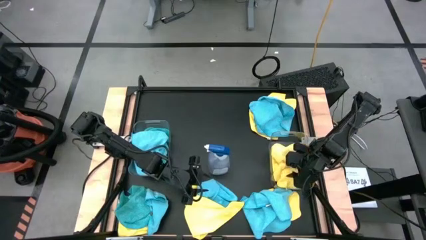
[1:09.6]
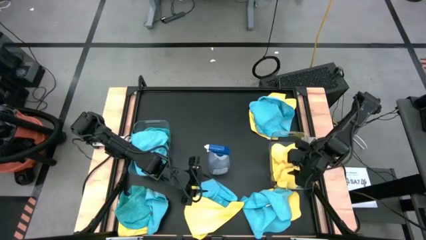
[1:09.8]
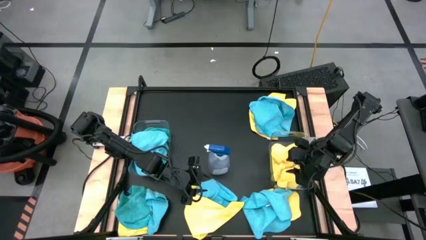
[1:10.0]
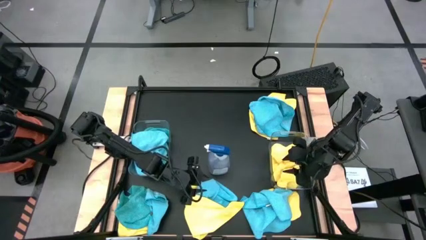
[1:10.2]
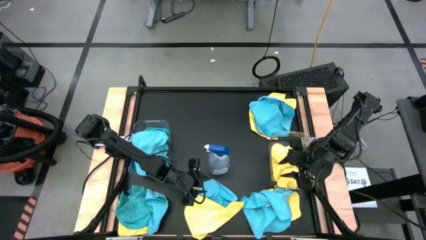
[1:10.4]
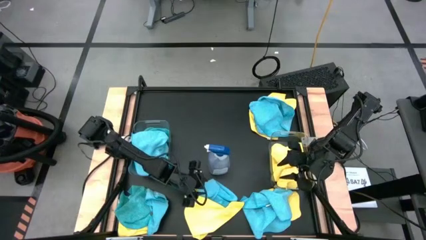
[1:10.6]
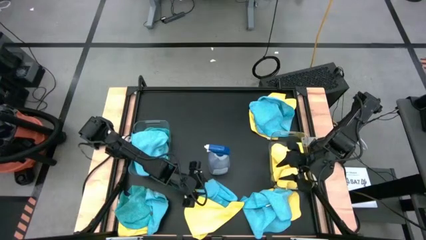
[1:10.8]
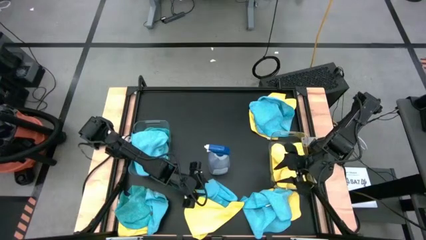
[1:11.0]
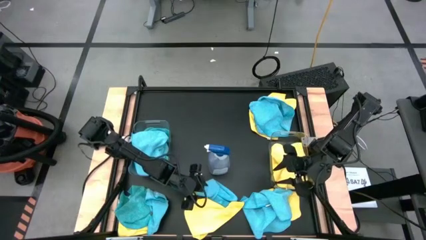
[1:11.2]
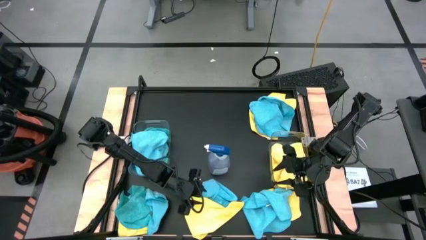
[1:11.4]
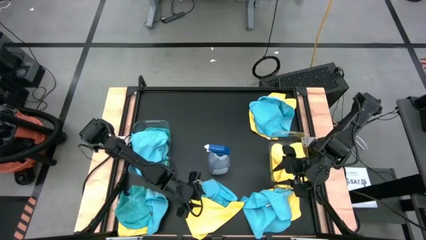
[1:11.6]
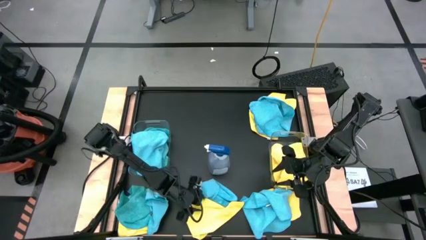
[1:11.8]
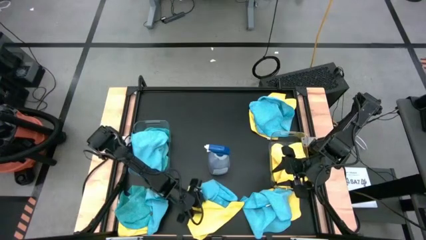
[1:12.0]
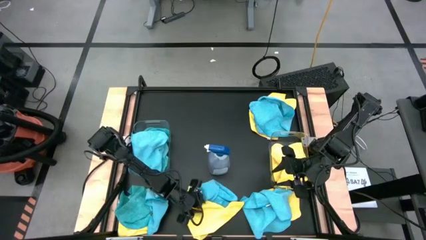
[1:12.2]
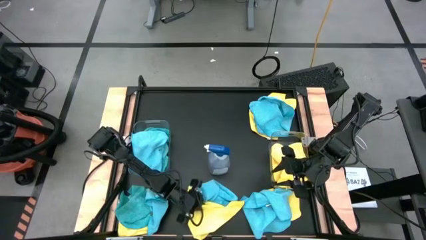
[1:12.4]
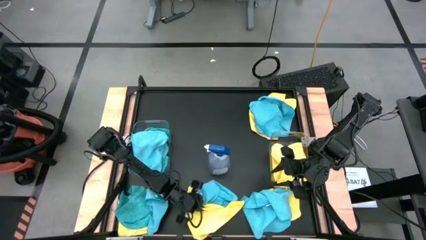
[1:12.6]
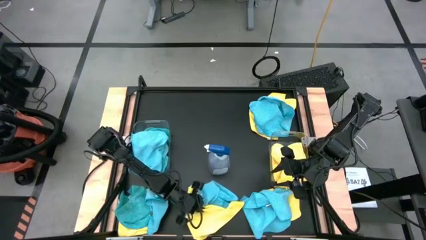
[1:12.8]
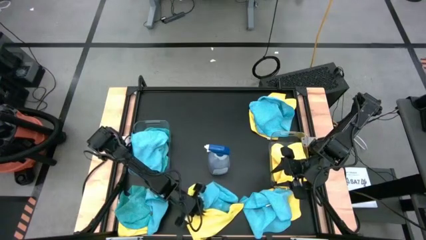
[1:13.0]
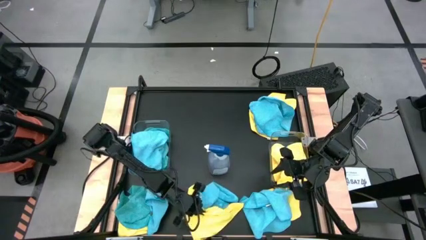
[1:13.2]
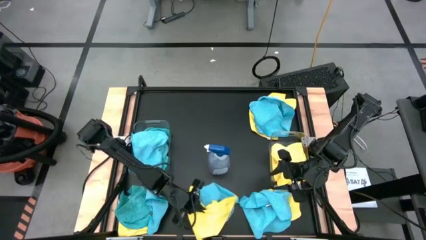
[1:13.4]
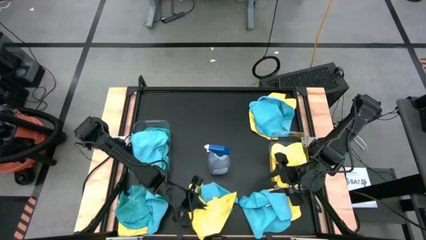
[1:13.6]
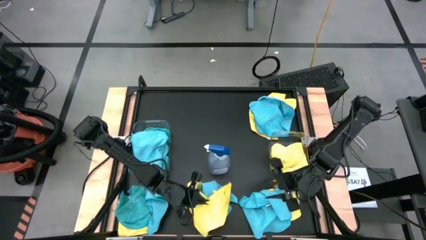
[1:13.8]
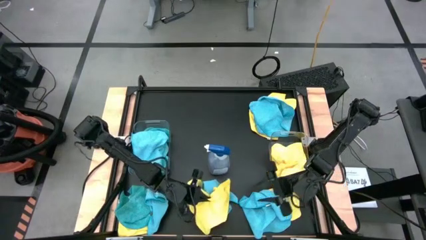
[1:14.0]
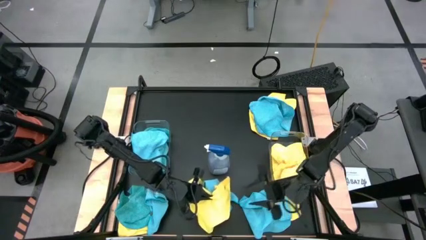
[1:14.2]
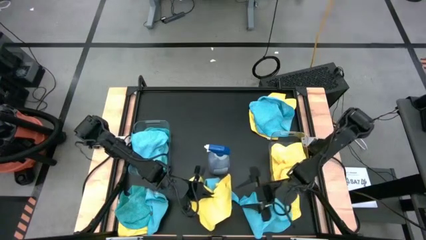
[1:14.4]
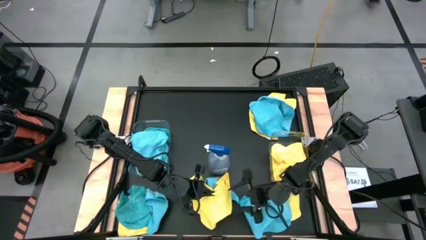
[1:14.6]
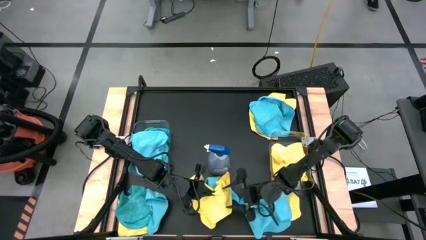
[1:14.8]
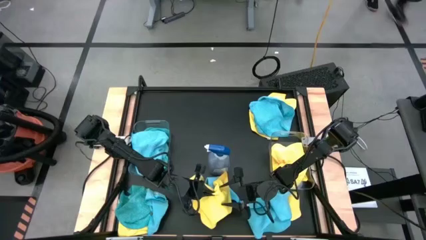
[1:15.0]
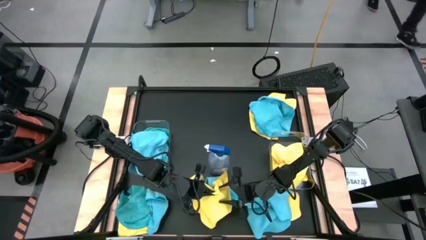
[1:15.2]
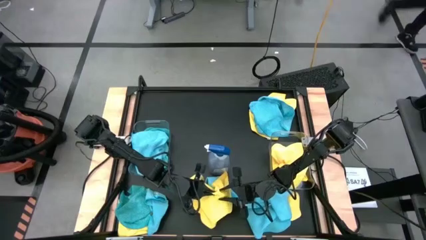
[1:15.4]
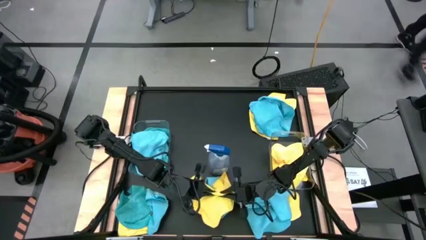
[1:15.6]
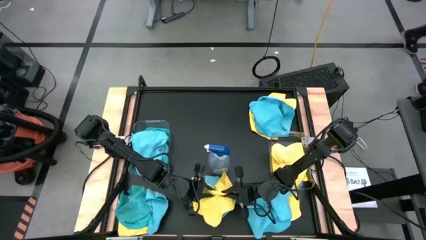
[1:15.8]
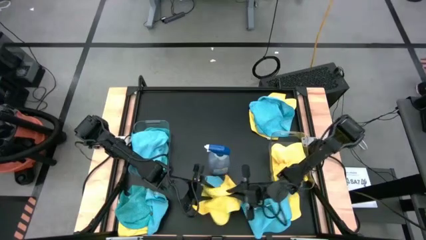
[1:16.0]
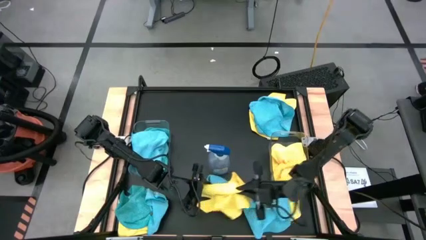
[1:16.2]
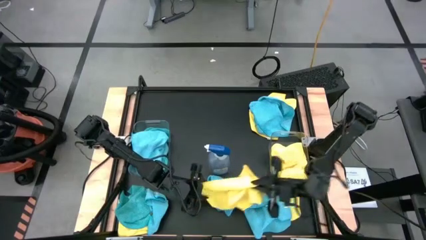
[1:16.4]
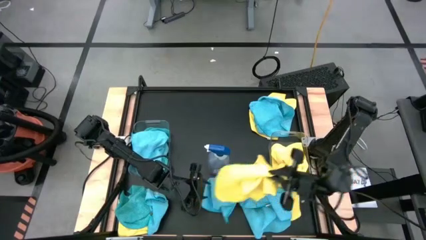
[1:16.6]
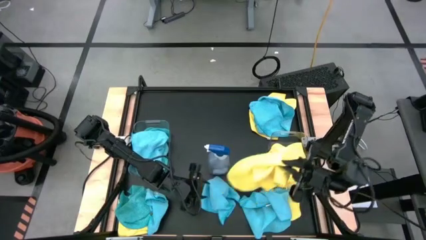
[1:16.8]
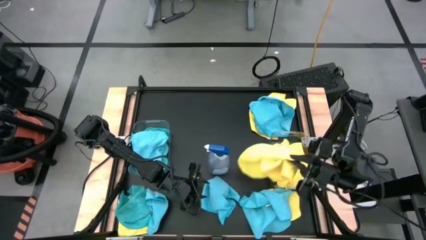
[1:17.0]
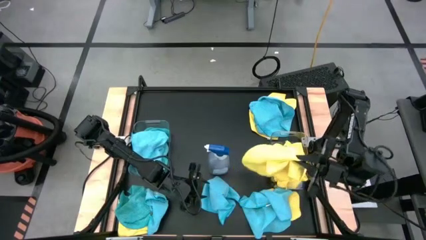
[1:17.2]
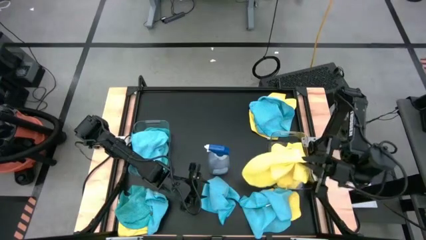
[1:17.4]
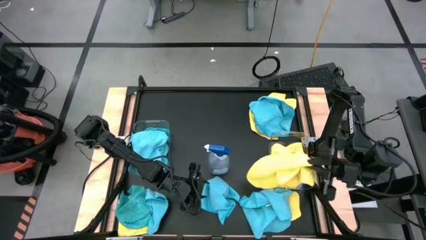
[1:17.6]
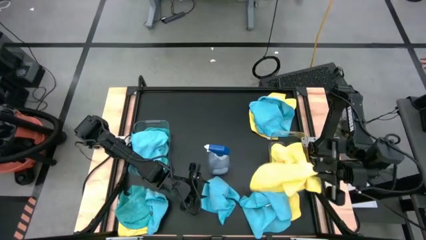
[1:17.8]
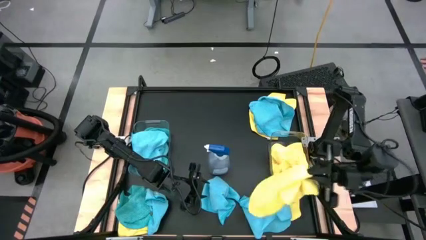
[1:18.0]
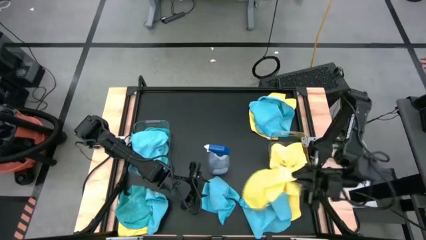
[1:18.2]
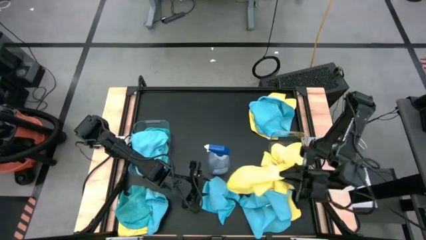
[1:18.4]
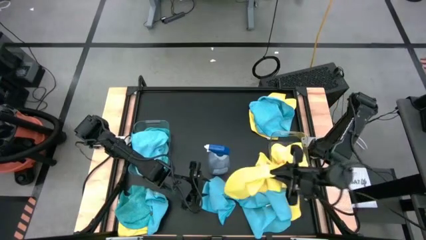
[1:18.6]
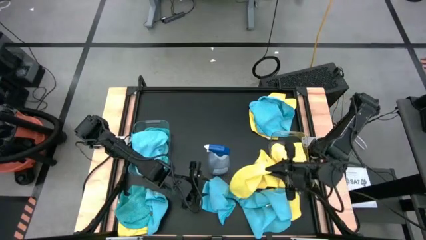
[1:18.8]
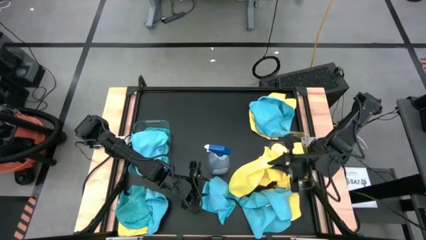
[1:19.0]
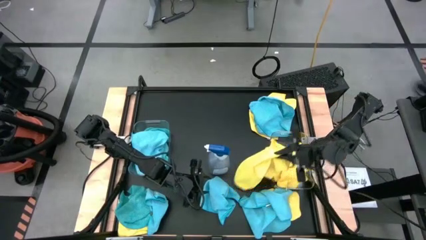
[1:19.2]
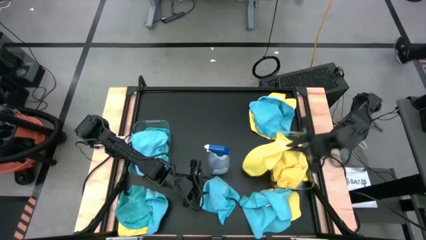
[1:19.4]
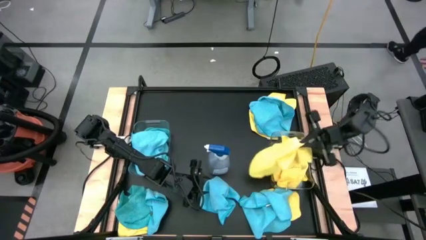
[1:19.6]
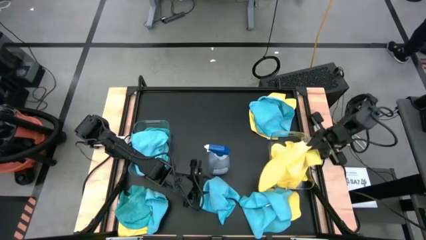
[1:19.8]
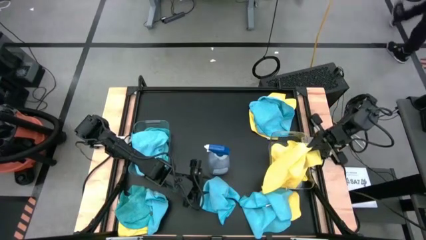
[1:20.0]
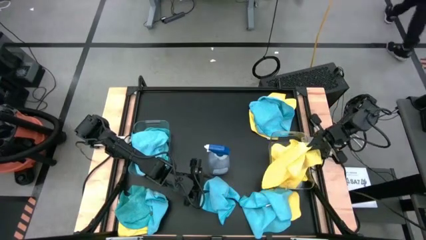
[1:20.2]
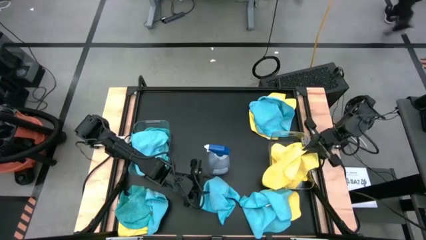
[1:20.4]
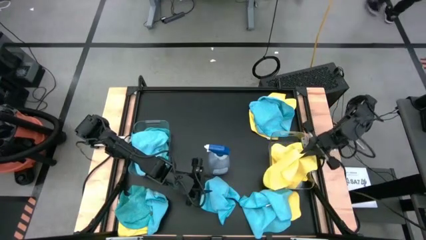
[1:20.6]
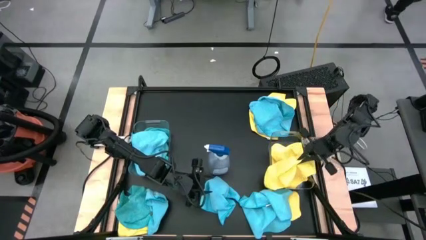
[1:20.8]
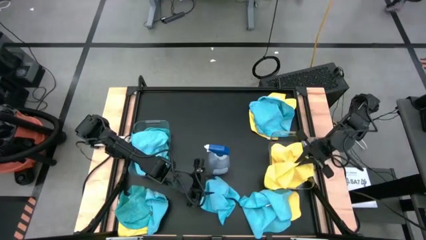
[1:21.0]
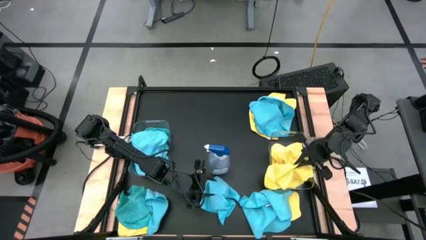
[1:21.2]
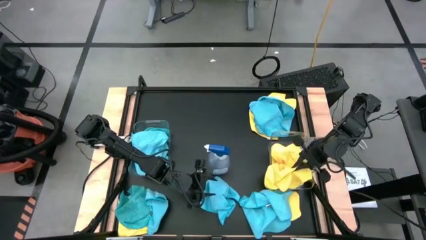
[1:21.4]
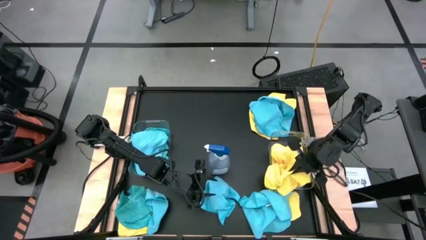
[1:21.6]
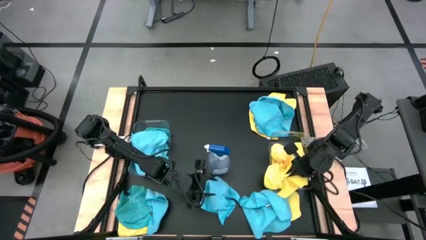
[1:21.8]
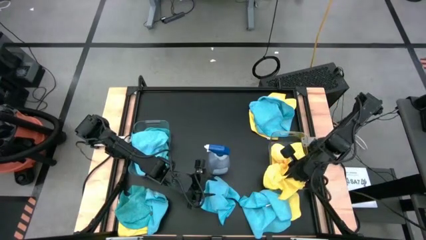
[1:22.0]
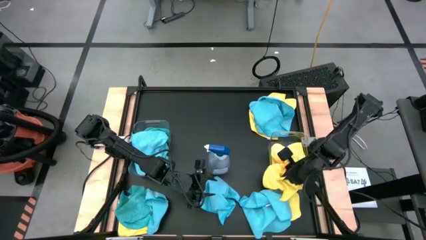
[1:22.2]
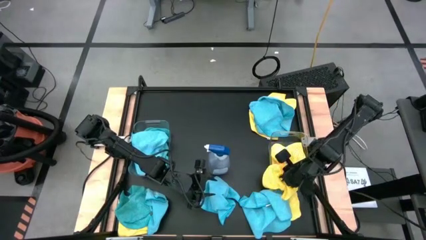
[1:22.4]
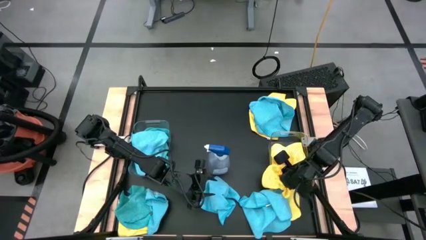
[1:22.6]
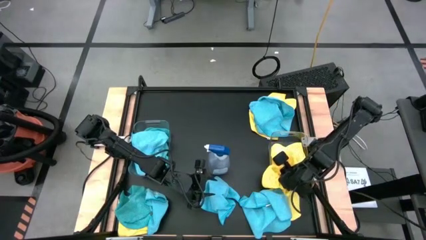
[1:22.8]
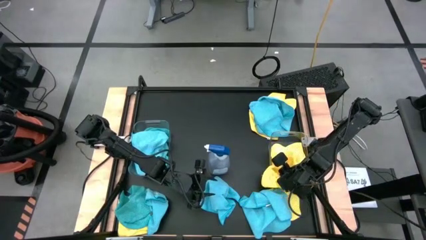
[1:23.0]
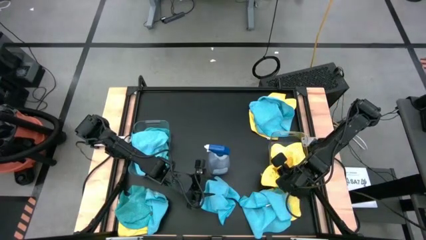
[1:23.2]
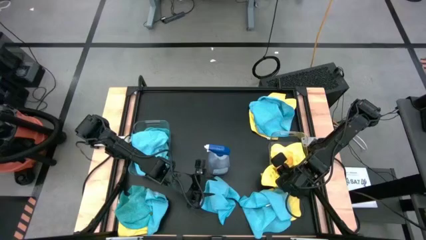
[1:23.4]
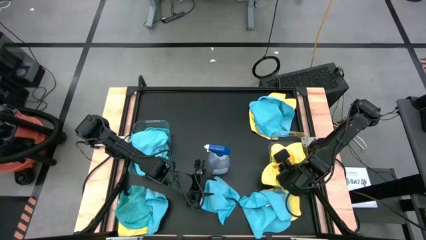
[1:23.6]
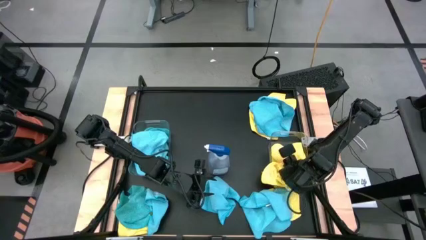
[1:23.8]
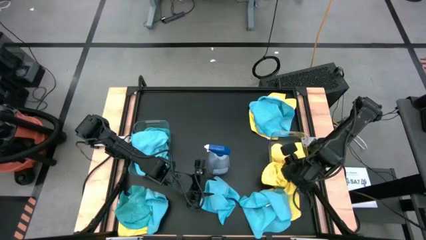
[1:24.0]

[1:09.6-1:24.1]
Task: Sort microfiber towel by color & place in baskets
Put the yellow microfiber cloth into the right transparent bin

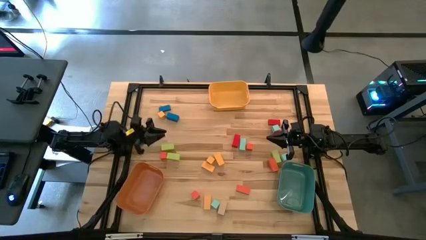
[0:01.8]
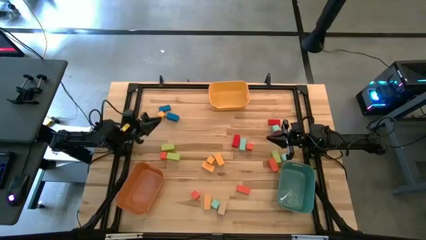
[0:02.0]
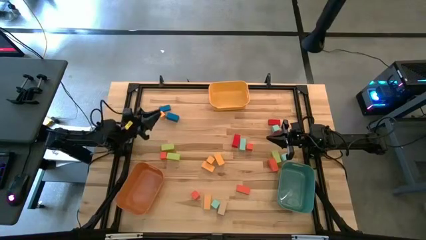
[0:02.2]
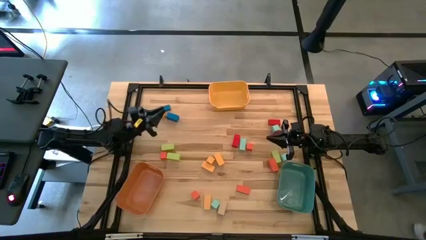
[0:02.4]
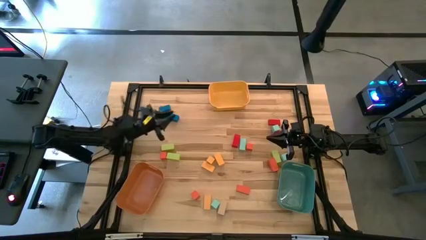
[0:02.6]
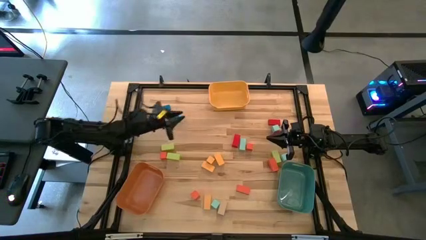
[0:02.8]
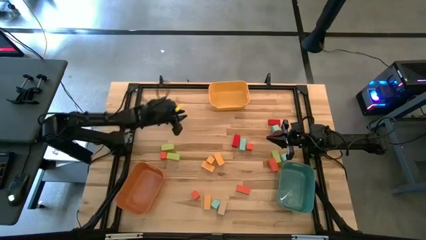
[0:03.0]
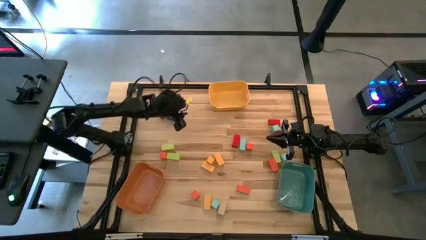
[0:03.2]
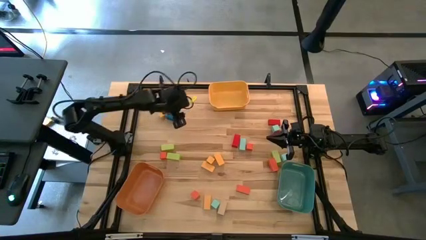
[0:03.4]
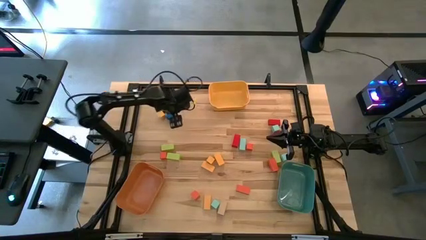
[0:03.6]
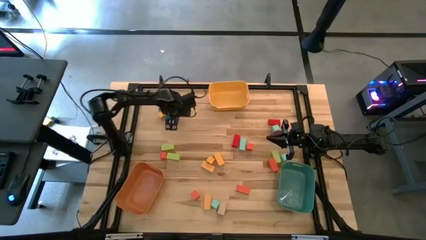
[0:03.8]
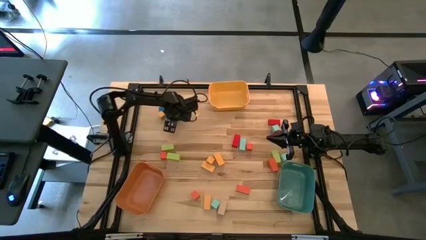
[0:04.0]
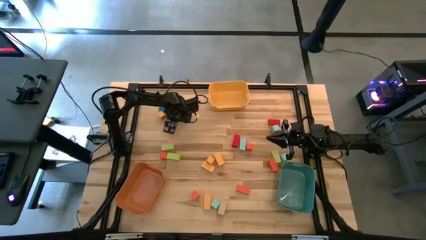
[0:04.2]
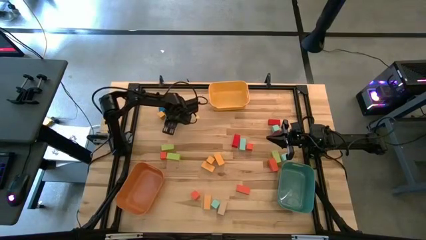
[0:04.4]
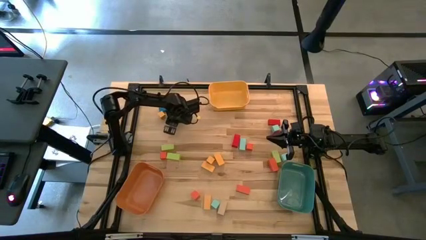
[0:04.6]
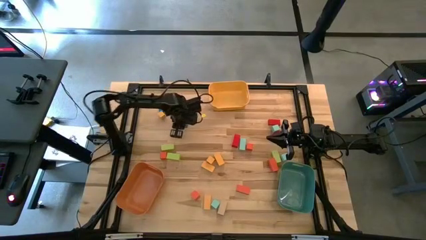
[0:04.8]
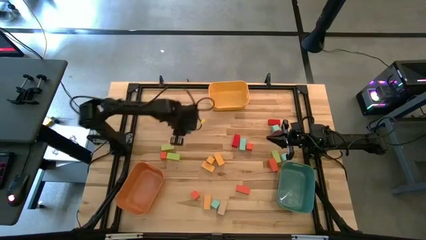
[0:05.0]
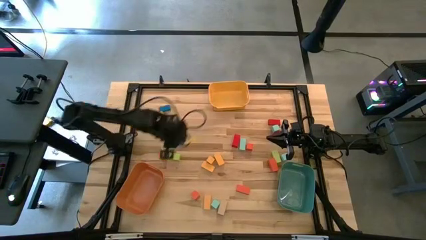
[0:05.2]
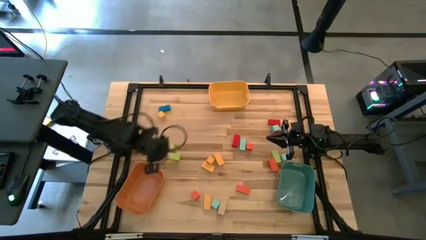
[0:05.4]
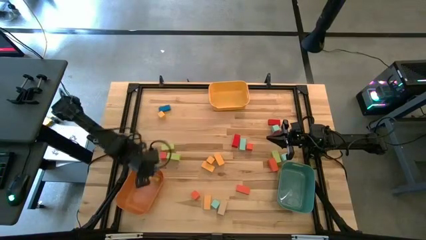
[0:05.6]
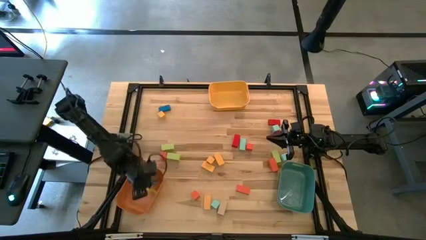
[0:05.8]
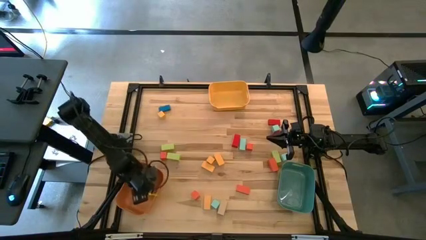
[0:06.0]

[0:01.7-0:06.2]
Task: Sort blocks by size
Put the thick blue block into the orange bin
